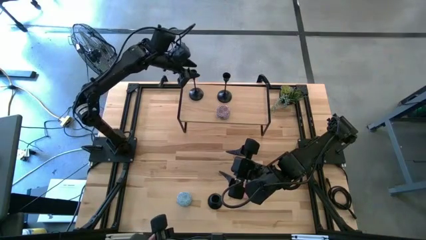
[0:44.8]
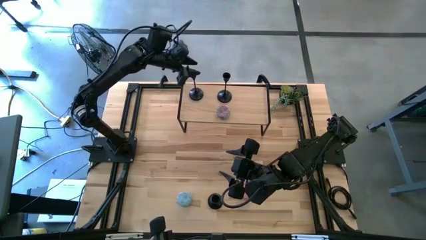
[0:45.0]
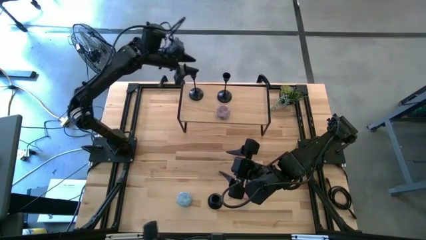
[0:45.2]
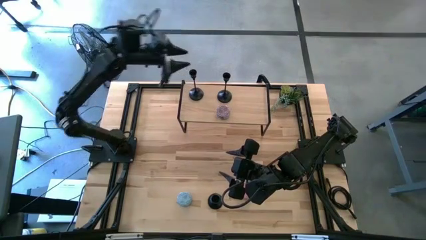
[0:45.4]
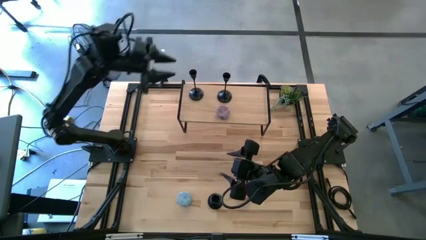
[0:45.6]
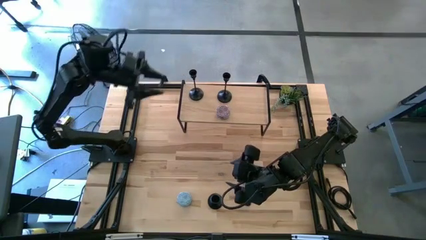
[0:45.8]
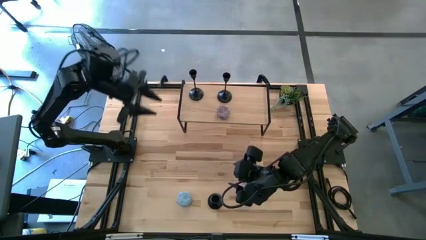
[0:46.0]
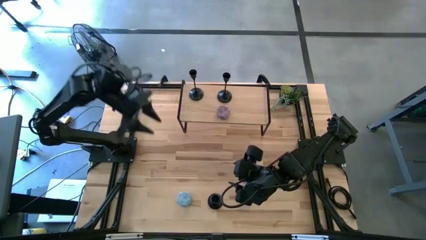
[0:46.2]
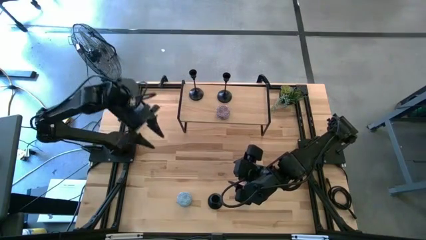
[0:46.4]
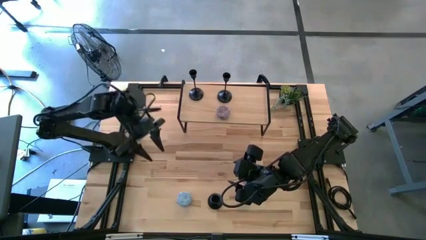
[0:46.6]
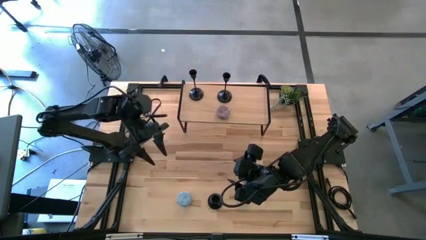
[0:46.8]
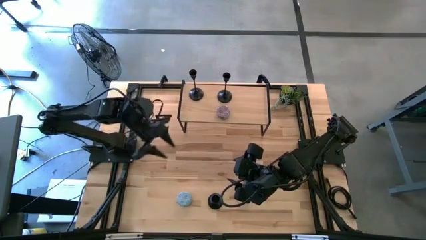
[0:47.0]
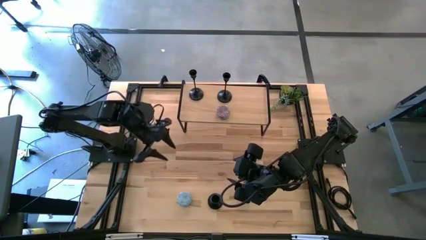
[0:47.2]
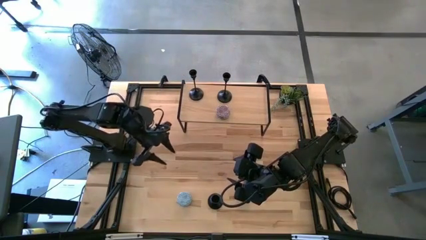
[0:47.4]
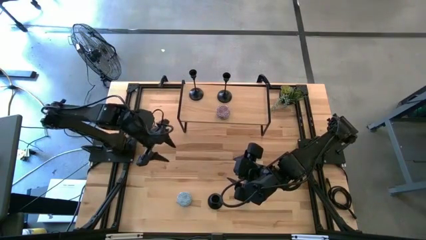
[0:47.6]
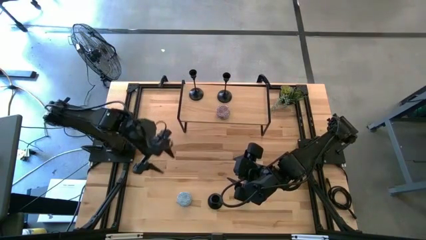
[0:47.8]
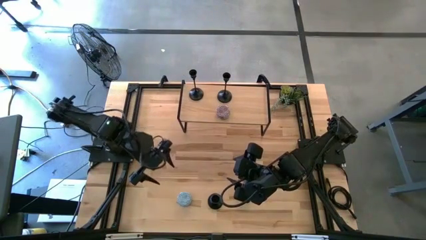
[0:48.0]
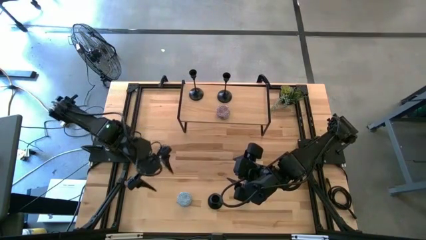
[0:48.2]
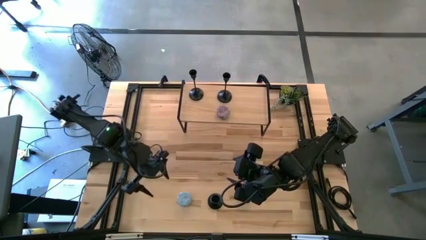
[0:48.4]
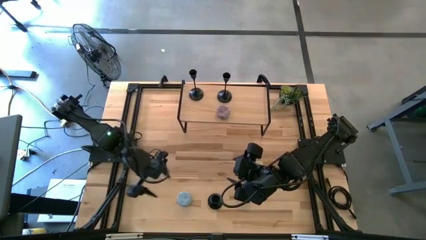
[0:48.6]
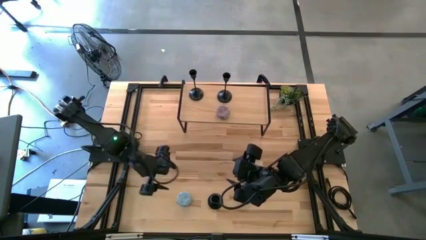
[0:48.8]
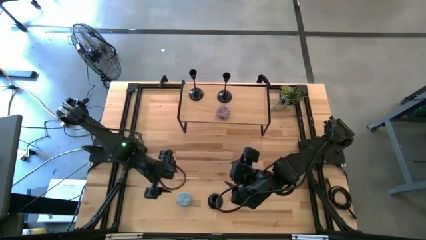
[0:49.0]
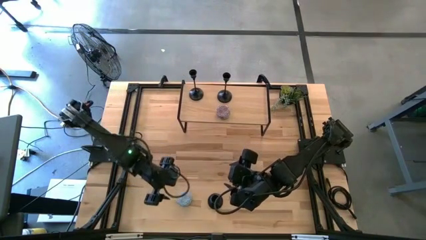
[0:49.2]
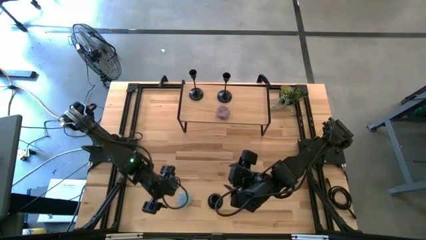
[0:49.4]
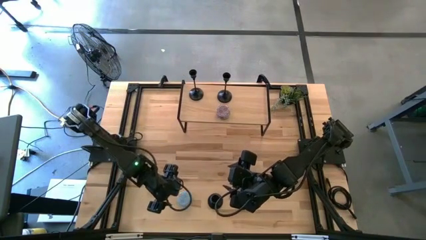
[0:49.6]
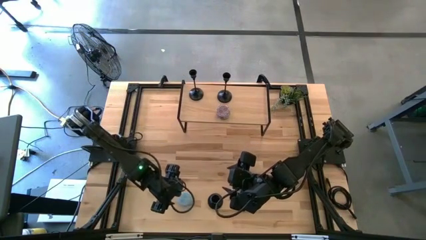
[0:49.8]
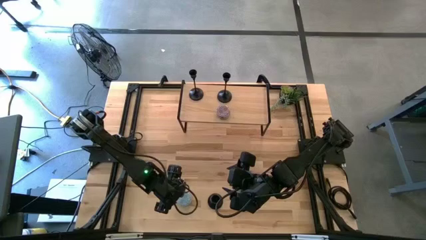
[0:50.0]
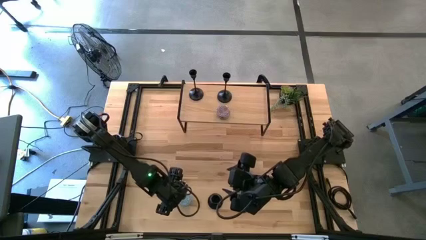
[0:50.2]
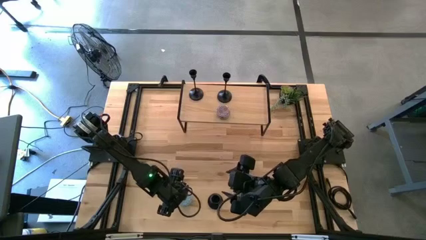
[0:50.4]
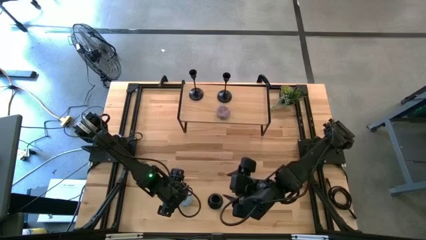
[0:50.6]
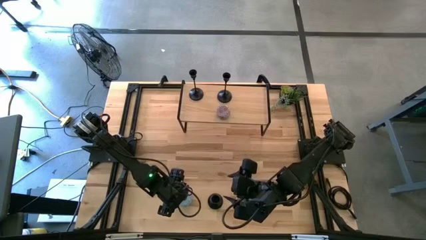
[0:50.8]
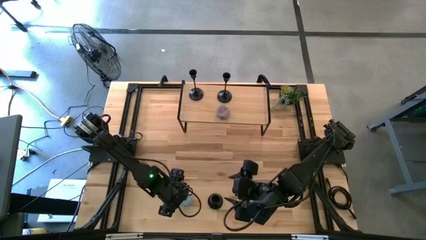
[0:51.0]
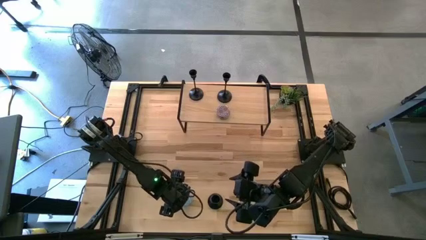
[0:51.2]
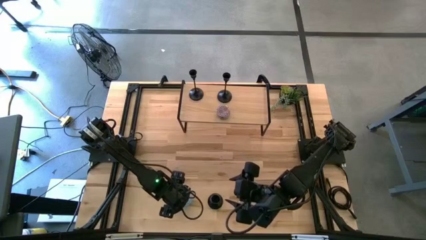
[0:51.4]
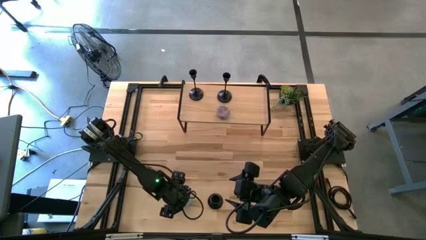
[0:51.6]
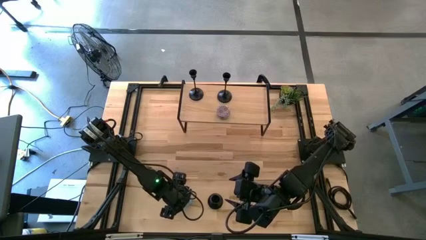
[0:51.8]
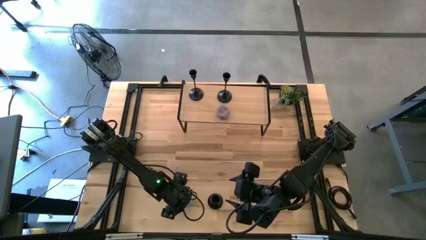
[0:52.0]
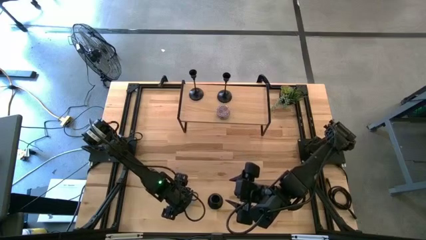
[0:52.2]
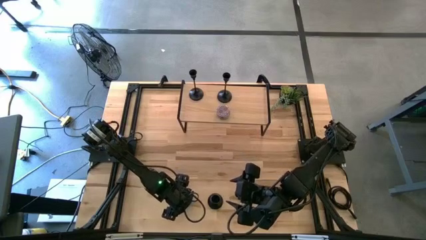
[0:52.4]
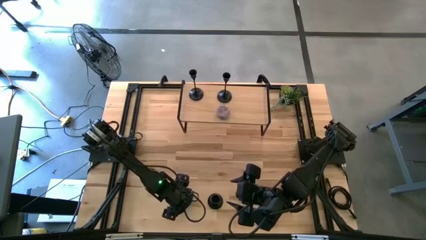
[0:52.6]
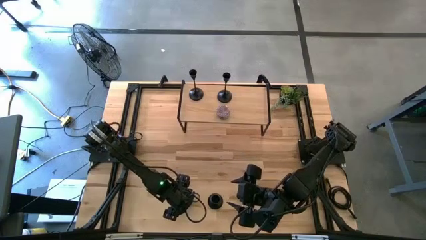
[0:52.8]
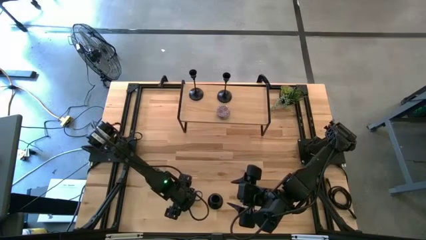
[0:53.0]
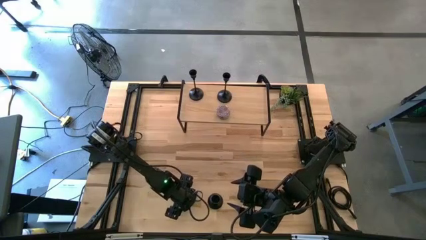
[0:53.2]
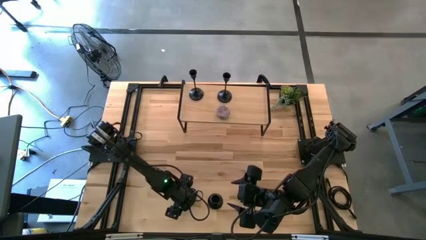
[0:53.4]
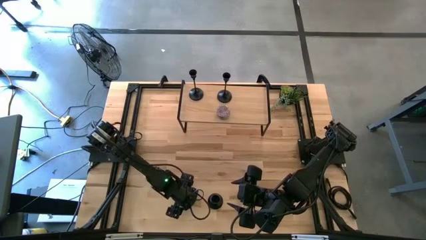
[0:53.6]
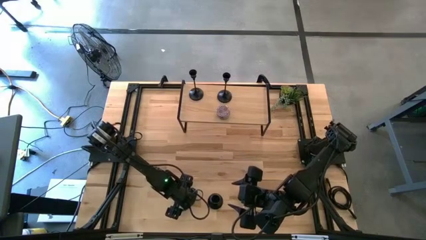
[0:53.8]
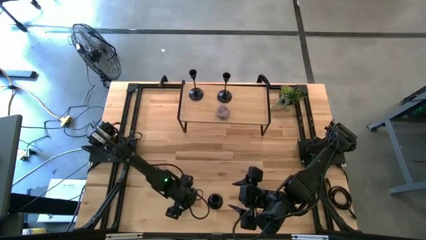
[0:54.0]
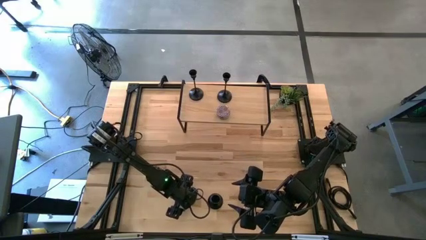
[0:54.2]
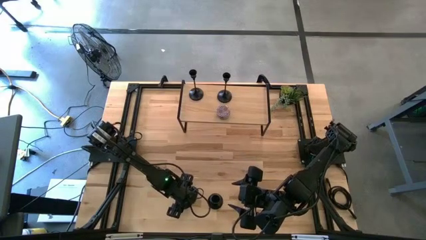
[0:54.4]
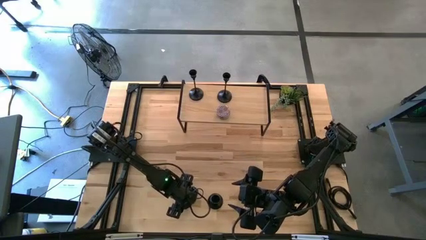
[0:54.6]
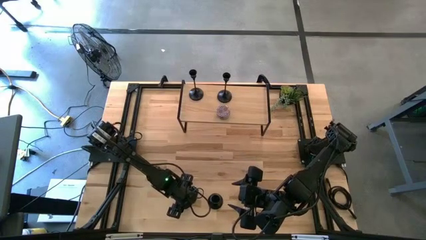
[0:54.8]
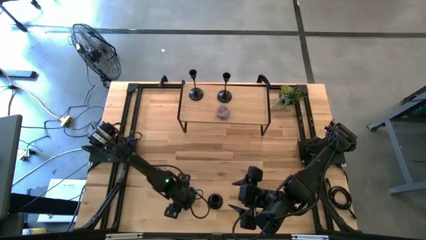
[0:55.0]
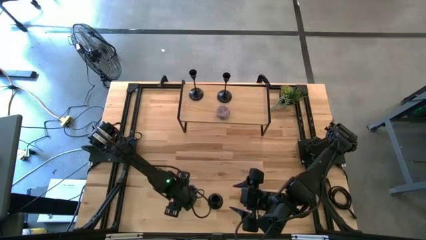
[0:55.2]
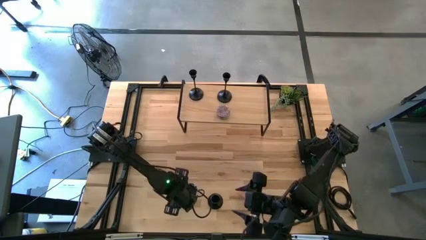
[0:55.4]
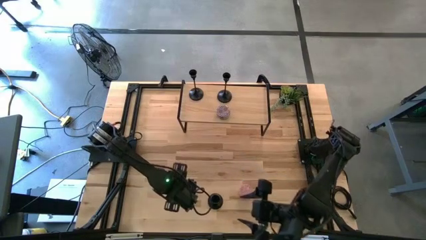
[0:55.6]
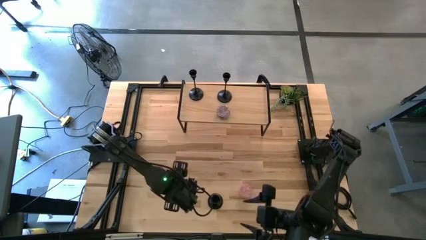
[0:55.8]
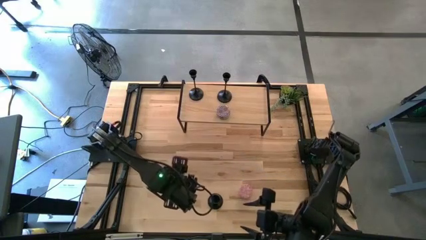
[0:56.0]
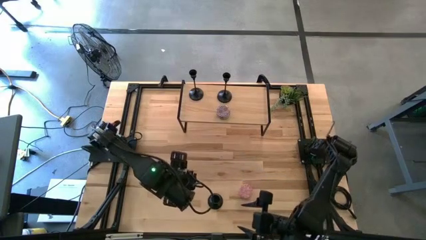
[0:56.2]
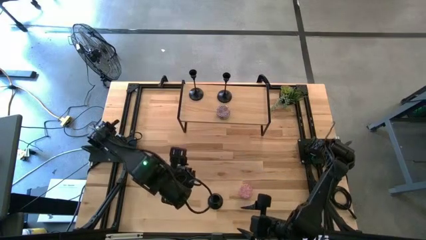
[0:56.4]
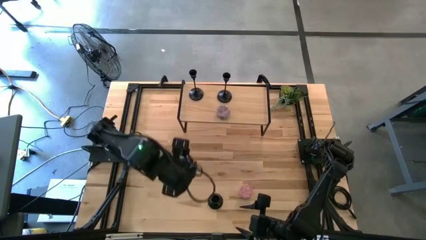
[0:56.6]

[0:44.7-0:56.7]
Task: Pick & Place candle stick holders
Put the blue scented candle on the shelf
